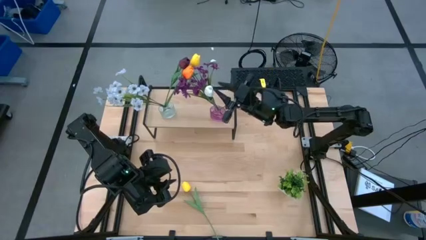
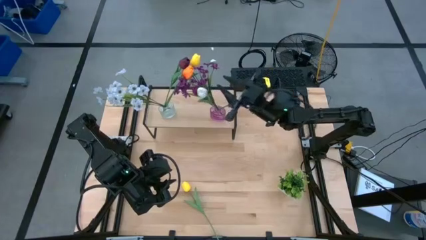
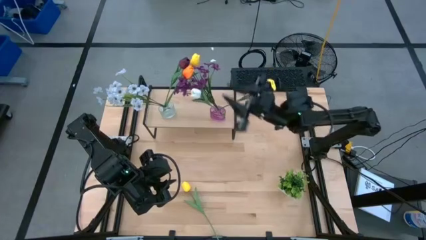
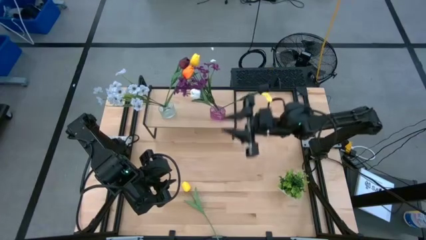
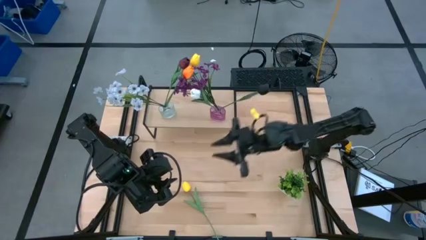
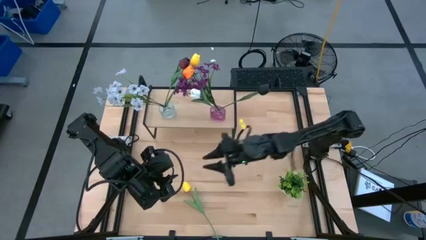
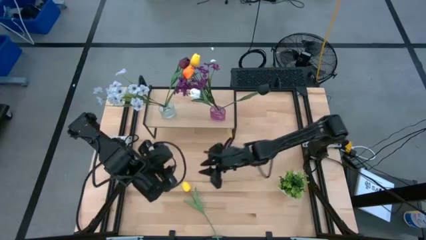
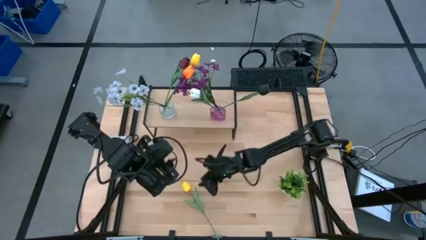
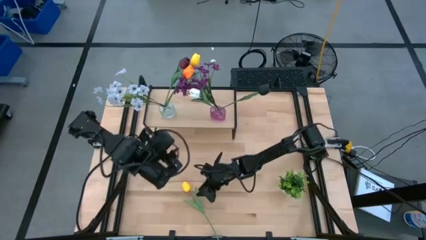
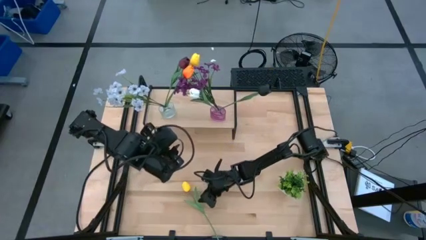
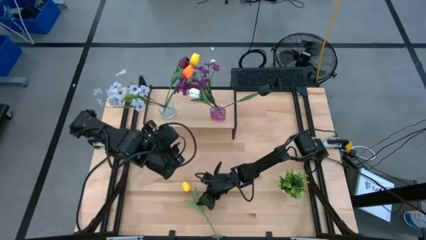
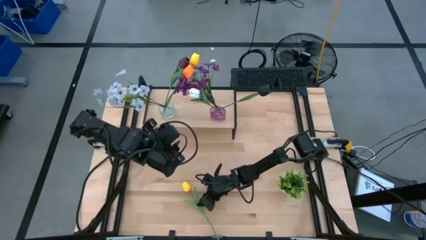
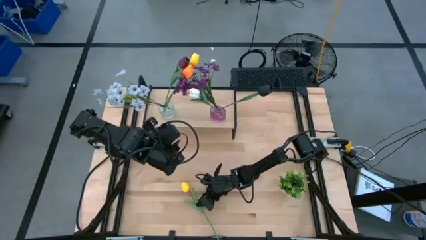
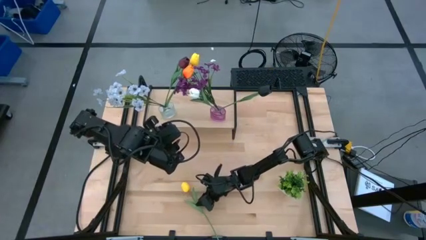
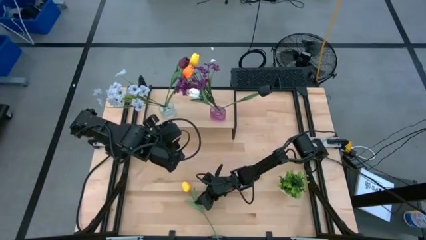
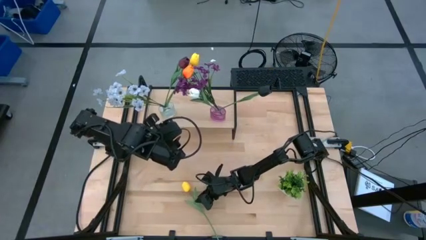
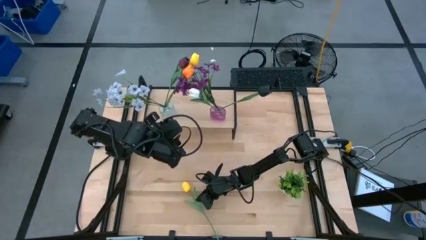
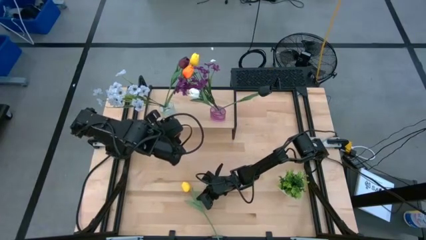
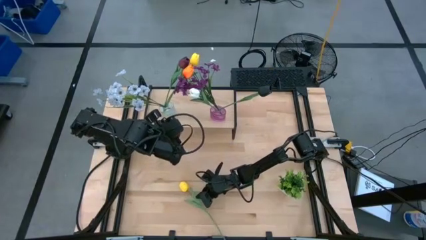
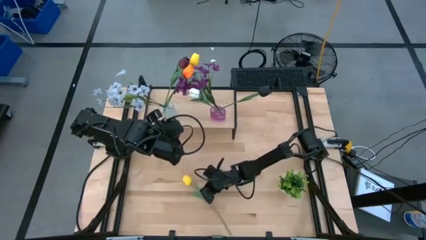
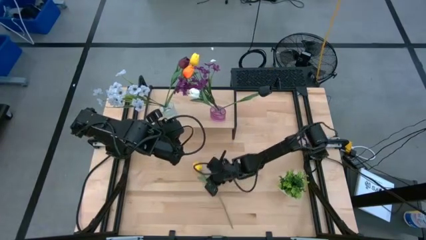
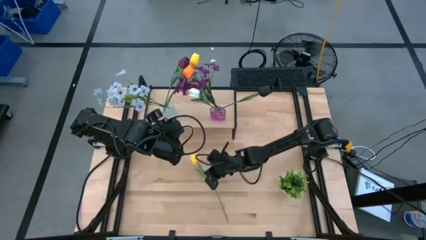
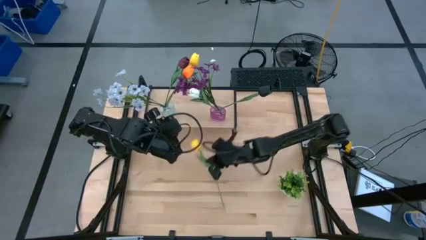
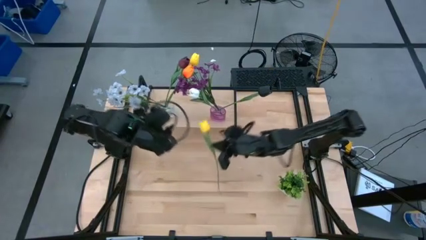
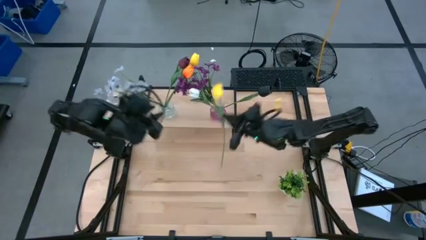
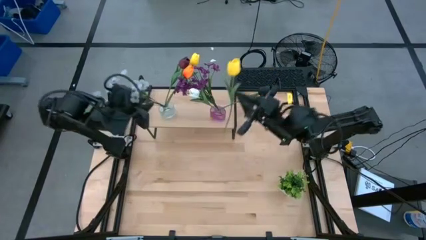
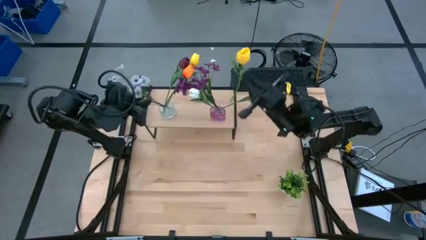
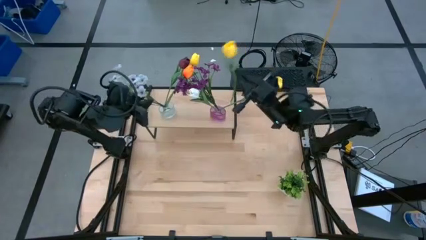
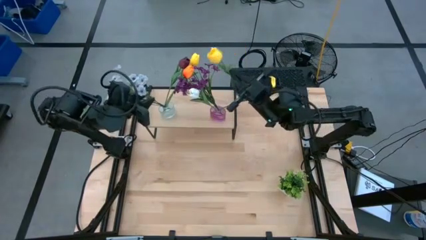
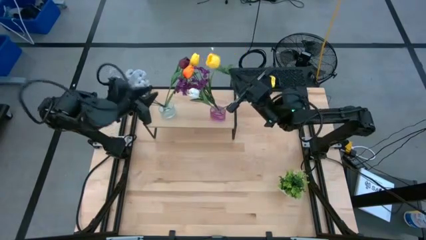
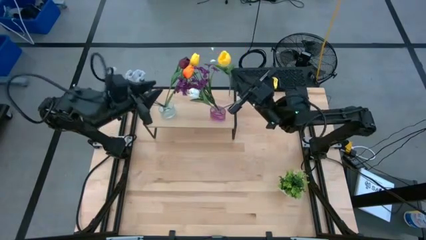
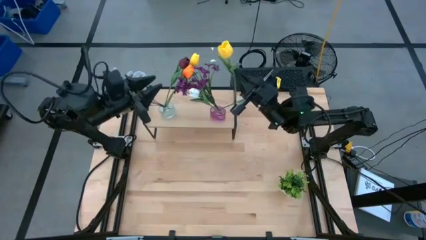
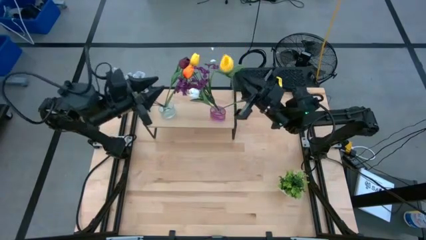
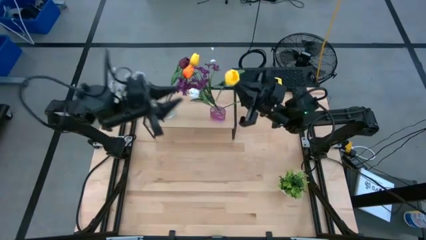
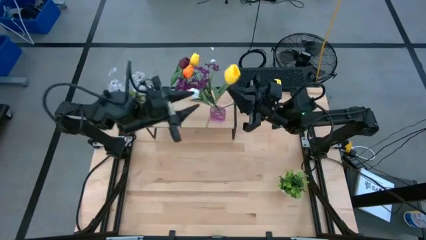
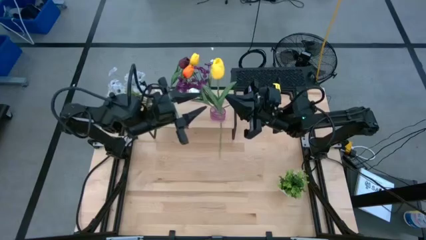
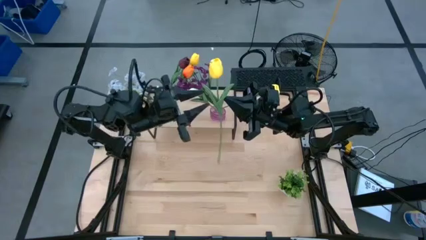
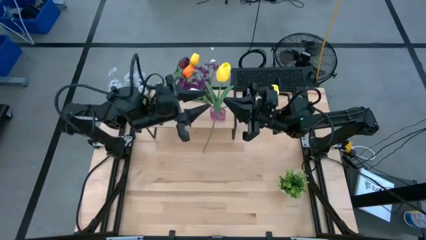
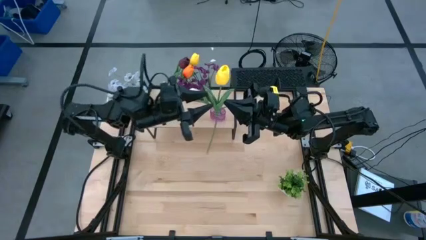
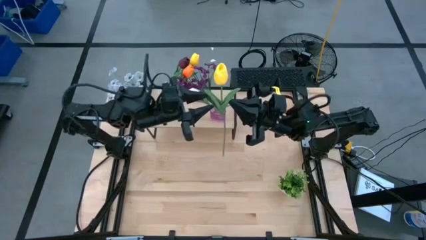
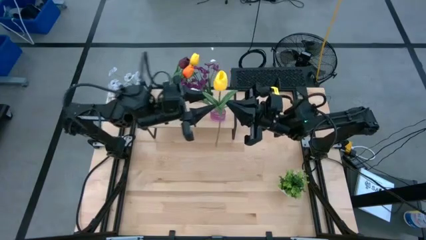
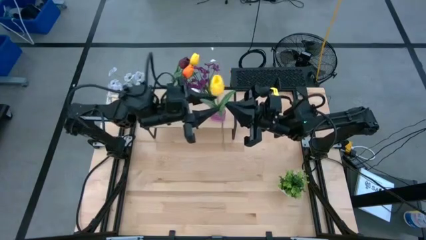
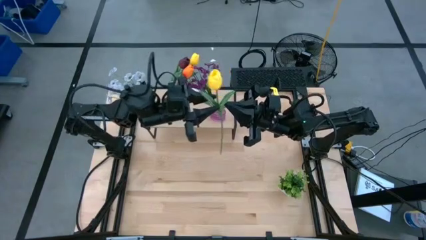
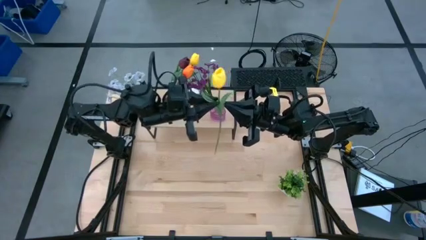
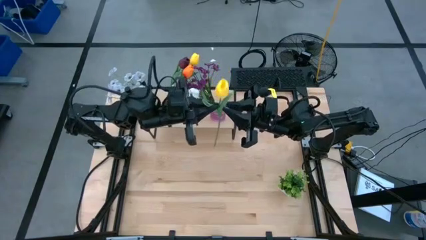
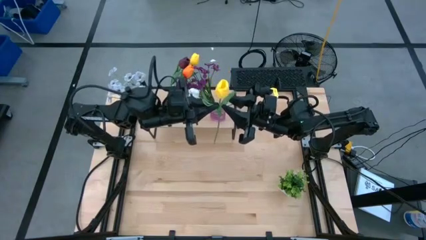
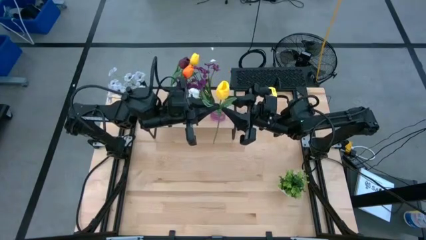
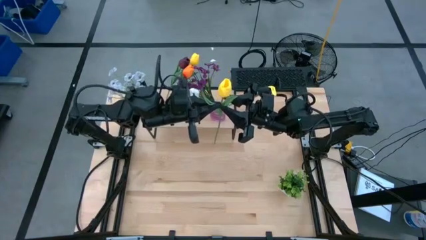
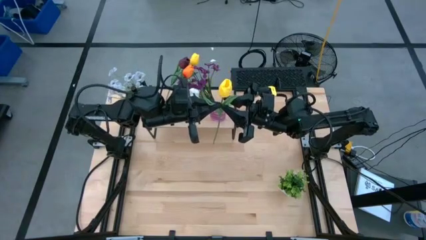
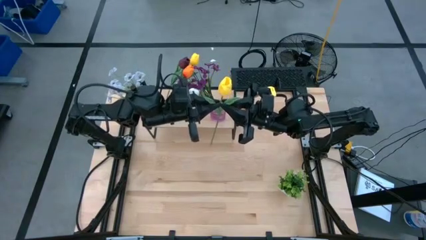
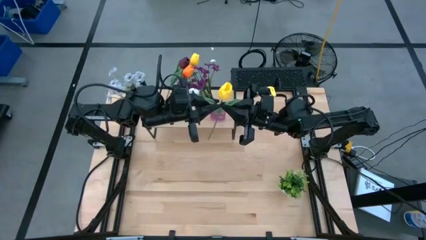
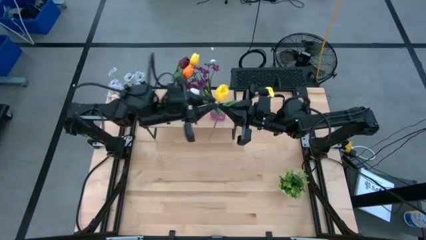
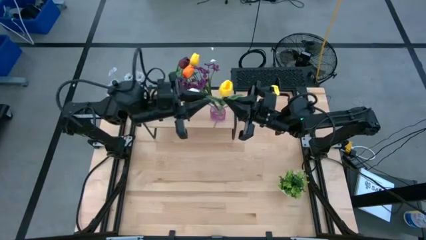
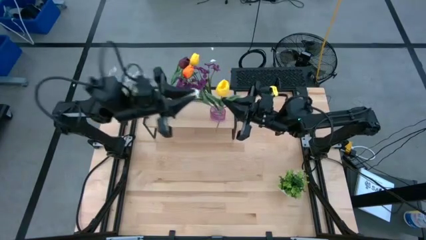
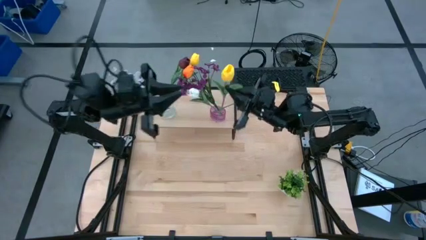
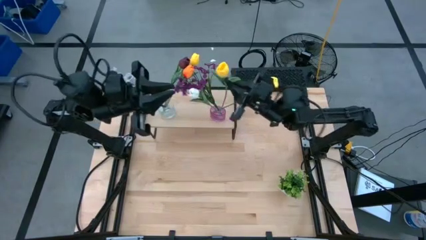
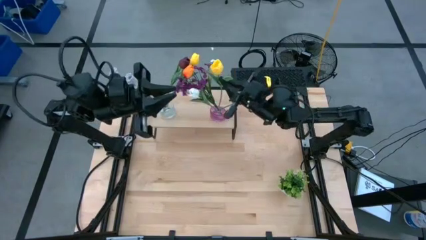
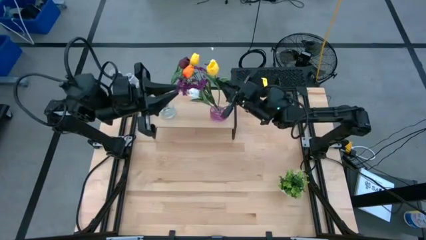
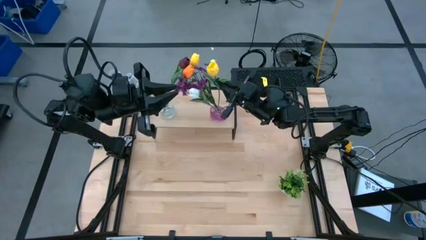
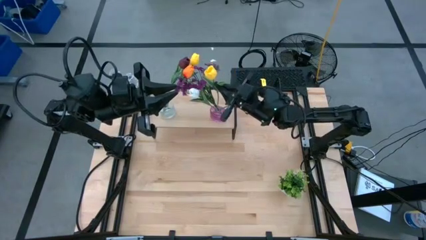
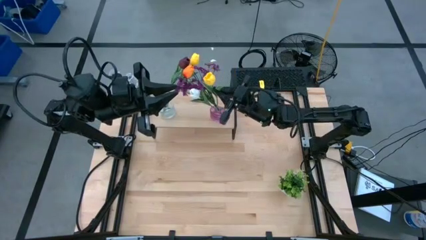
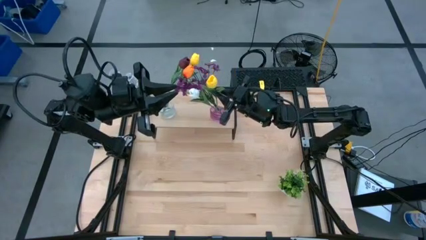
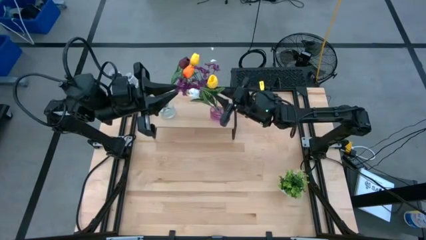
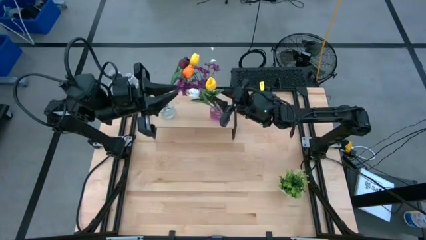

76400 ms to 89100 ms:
Task: Pick and place flowers into a vace then onto a shelf
Put the yellow flower into the violet vase on the shelf

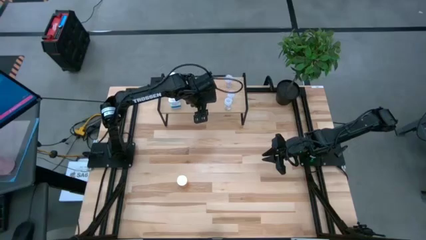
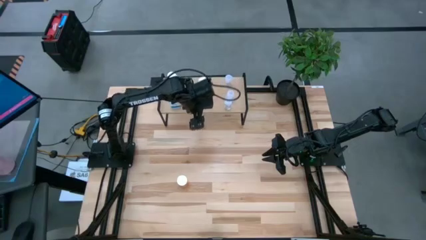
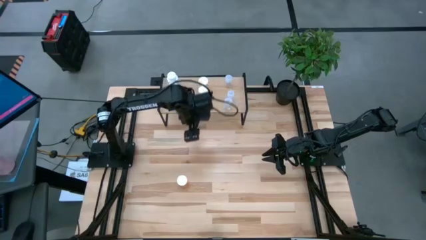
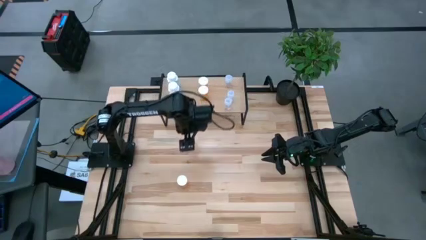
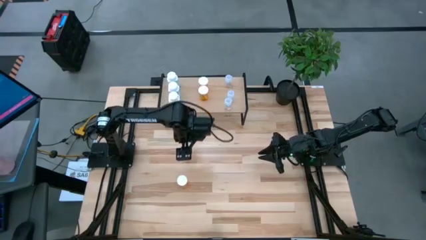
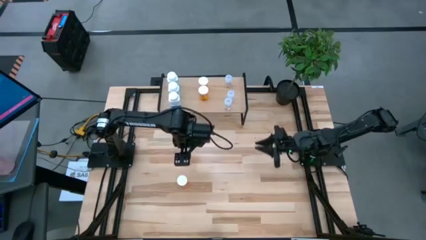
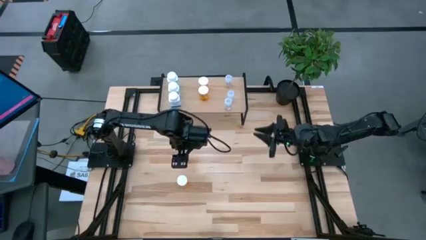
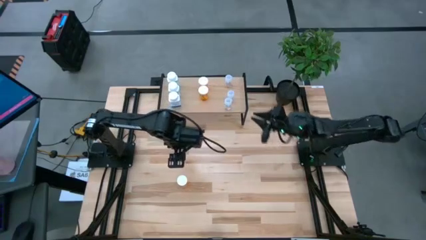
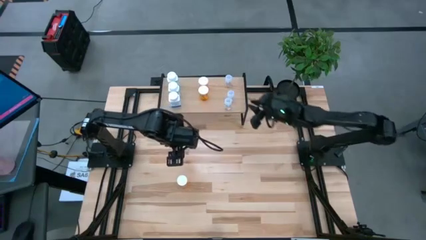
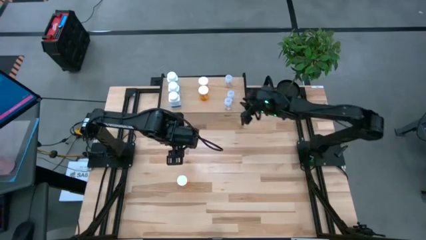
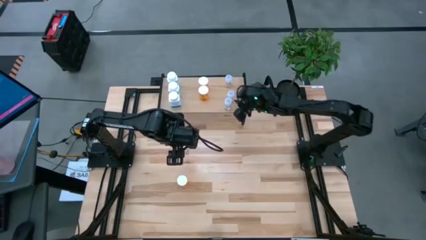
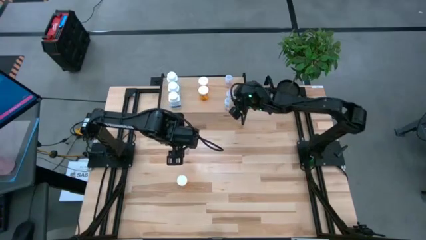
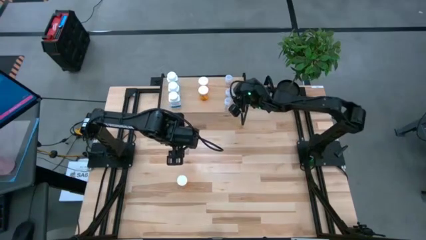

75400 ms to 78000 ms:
Task: Pick and place medicine bottles onto shelf by color
Adjust the transparent pill bottle on the shelf
